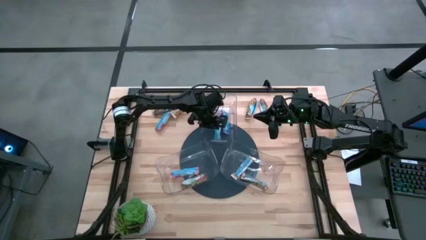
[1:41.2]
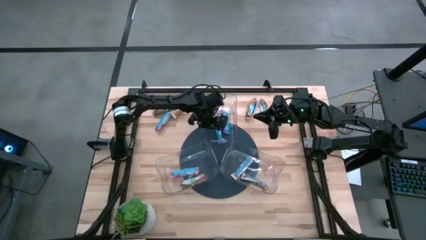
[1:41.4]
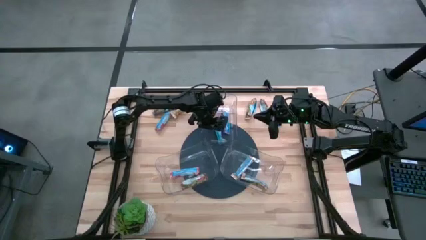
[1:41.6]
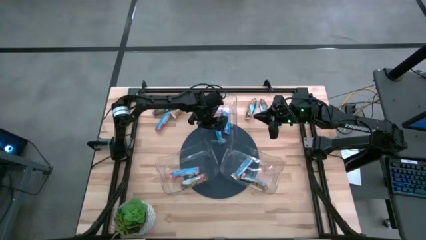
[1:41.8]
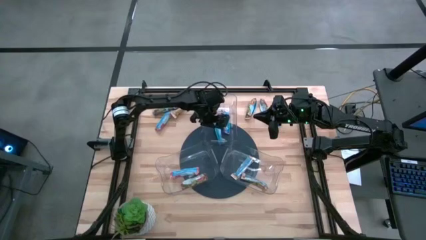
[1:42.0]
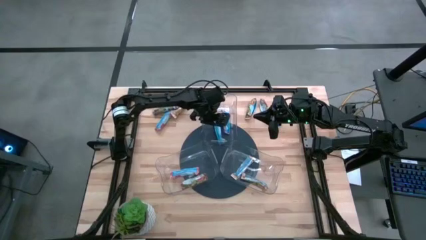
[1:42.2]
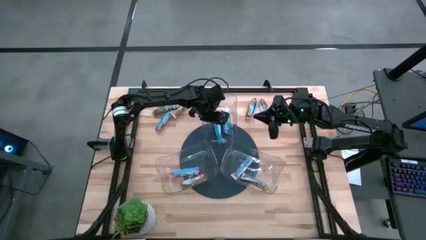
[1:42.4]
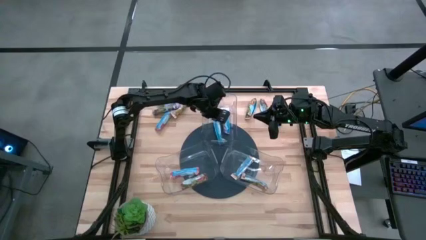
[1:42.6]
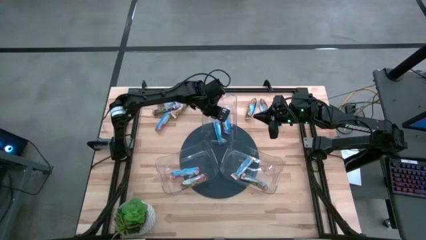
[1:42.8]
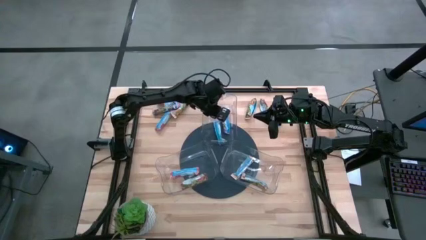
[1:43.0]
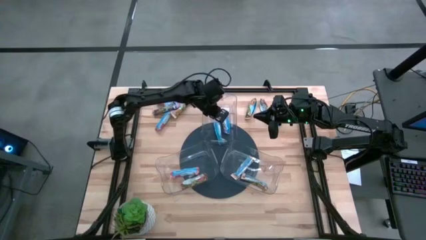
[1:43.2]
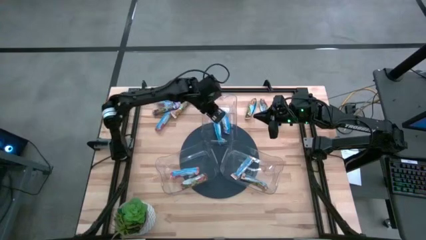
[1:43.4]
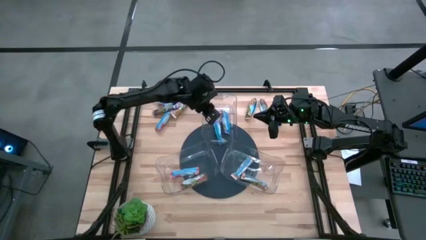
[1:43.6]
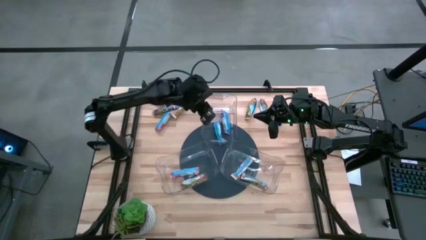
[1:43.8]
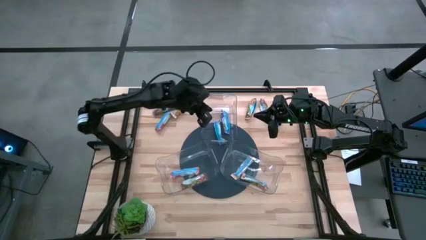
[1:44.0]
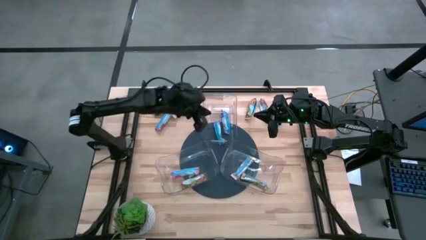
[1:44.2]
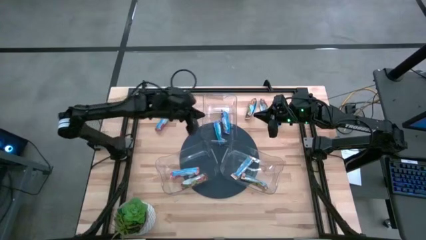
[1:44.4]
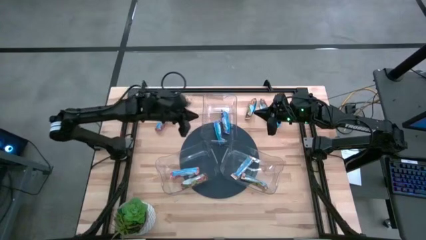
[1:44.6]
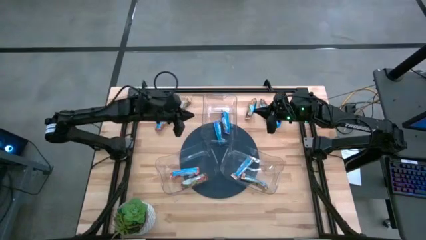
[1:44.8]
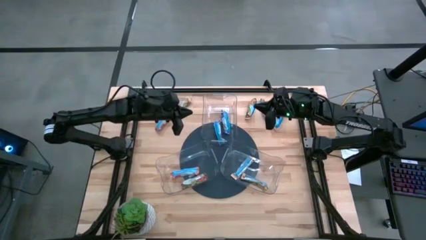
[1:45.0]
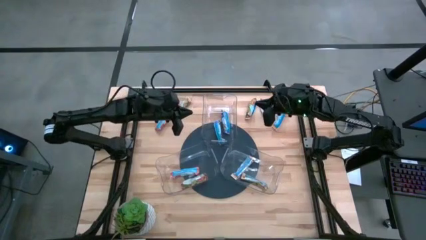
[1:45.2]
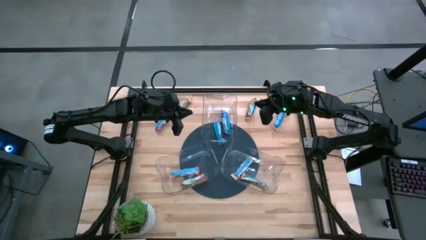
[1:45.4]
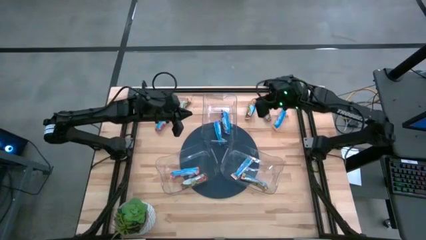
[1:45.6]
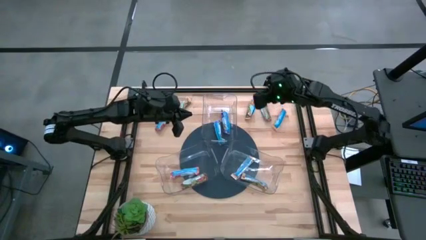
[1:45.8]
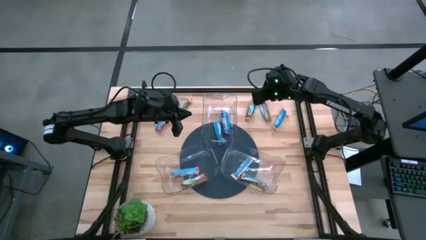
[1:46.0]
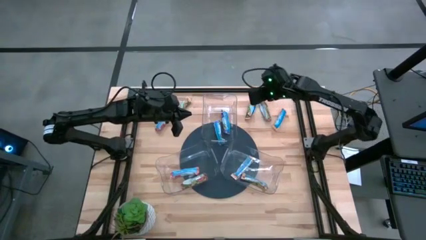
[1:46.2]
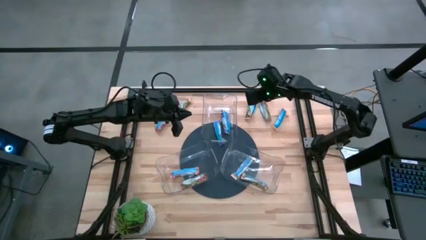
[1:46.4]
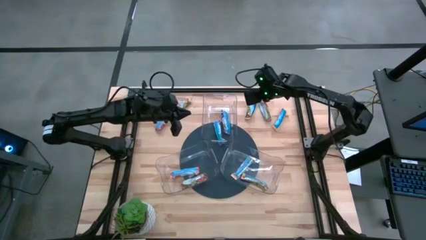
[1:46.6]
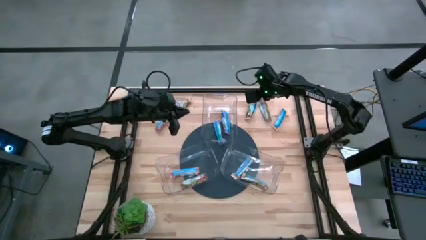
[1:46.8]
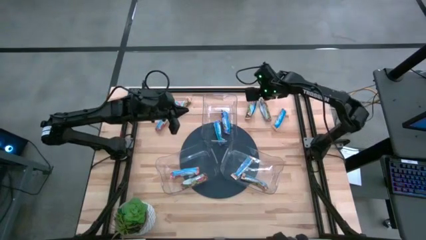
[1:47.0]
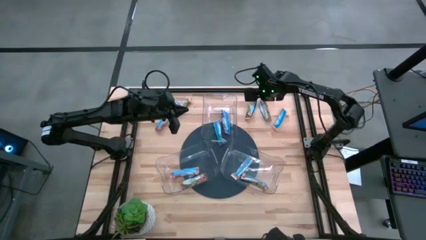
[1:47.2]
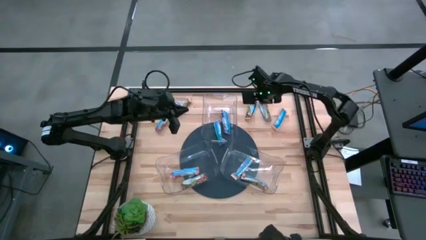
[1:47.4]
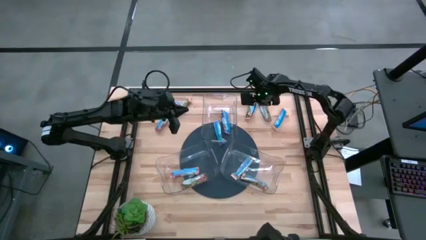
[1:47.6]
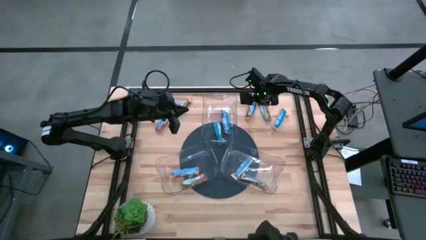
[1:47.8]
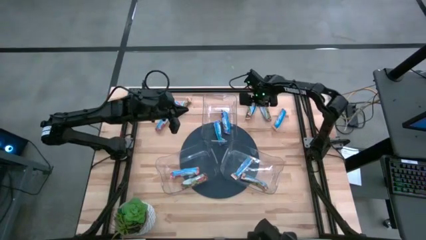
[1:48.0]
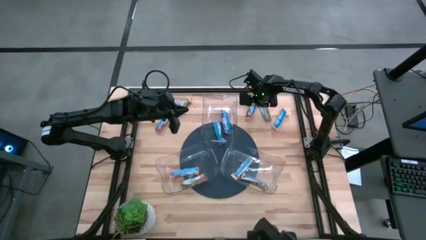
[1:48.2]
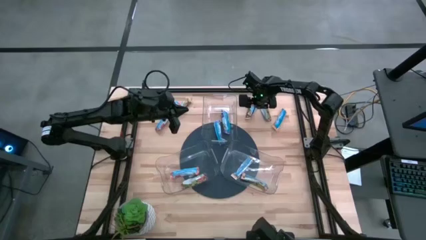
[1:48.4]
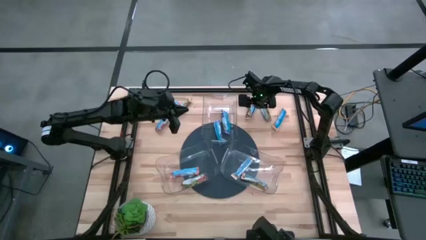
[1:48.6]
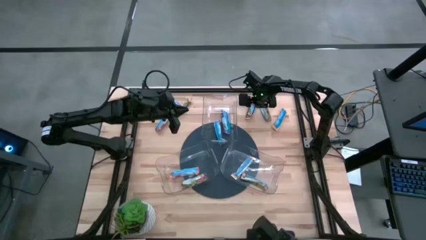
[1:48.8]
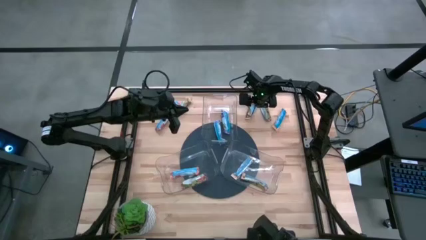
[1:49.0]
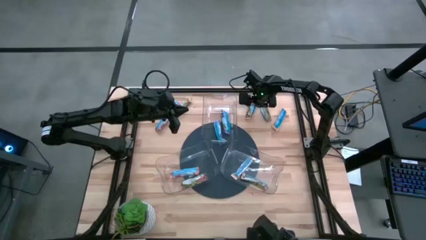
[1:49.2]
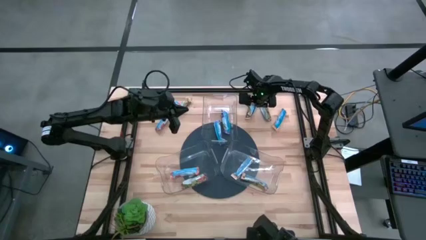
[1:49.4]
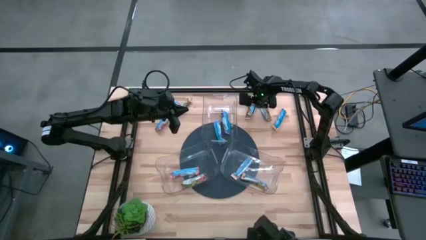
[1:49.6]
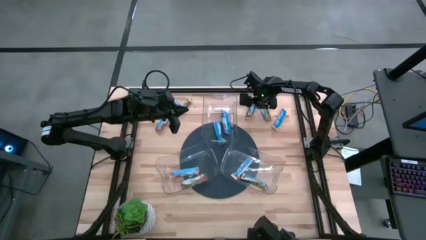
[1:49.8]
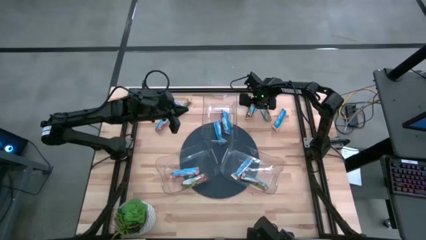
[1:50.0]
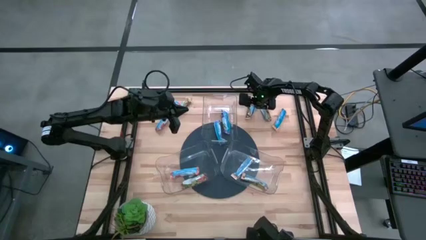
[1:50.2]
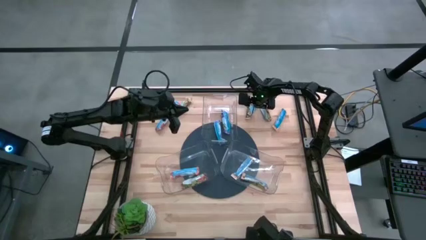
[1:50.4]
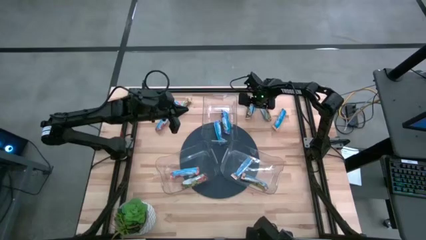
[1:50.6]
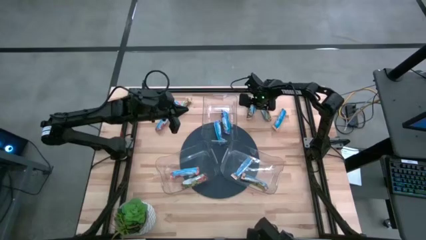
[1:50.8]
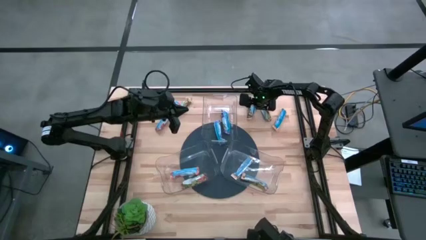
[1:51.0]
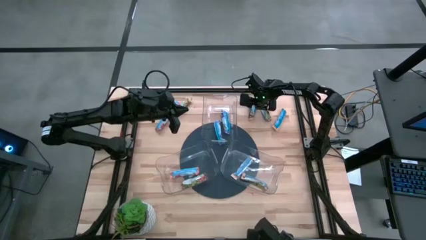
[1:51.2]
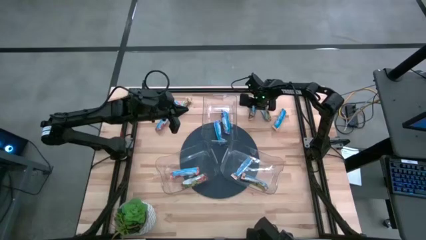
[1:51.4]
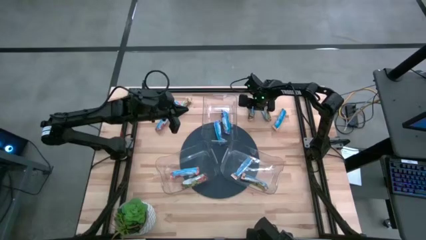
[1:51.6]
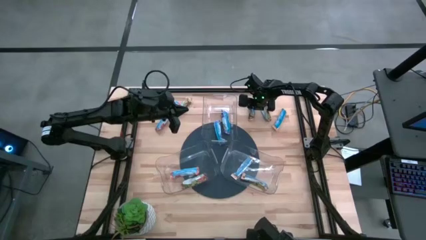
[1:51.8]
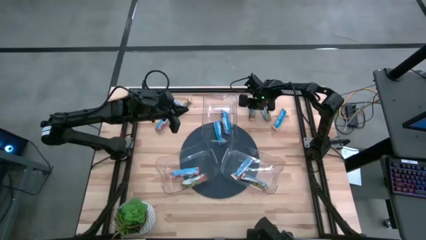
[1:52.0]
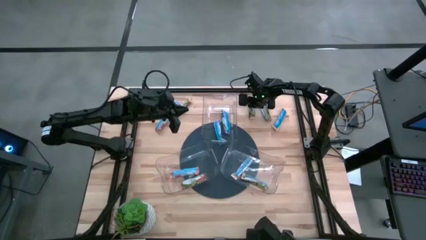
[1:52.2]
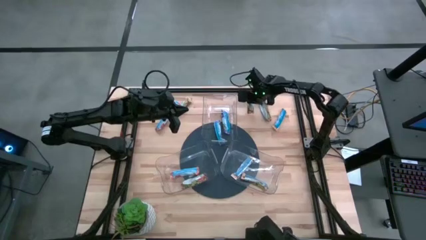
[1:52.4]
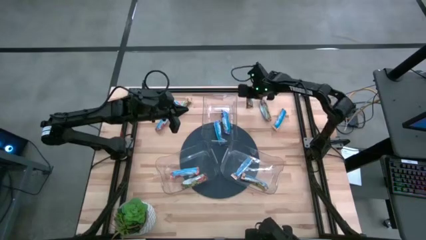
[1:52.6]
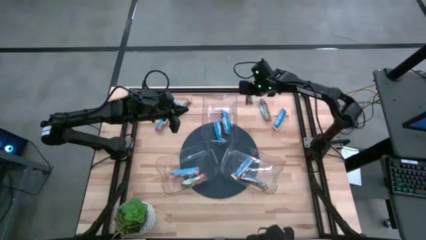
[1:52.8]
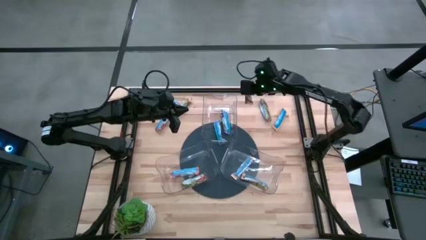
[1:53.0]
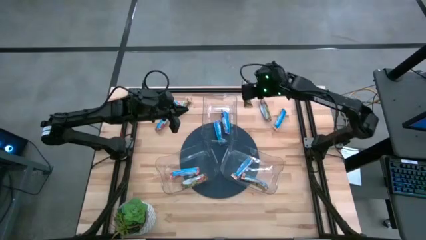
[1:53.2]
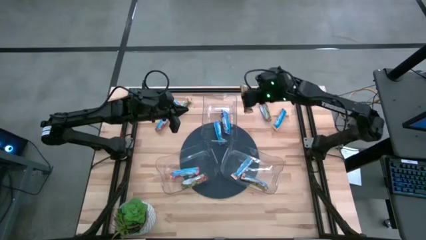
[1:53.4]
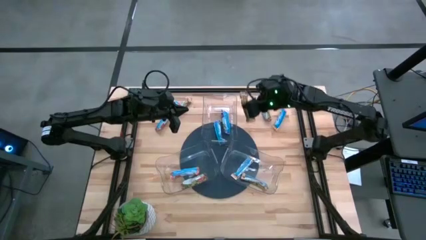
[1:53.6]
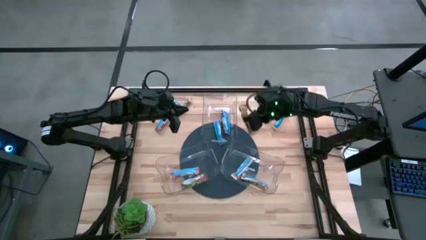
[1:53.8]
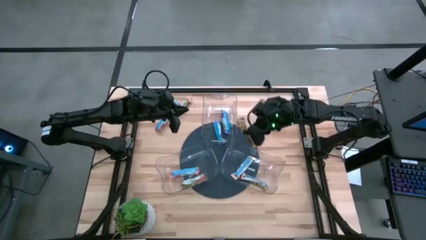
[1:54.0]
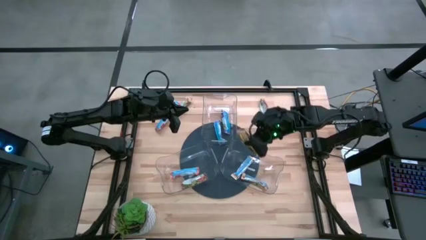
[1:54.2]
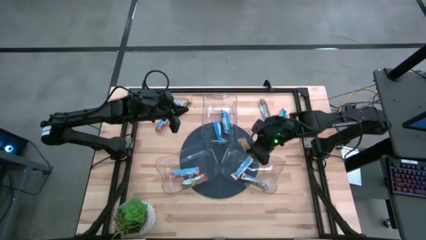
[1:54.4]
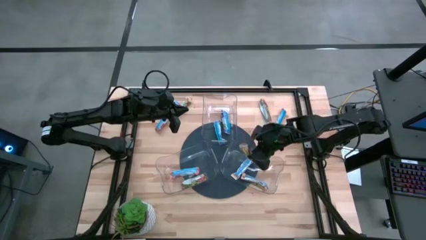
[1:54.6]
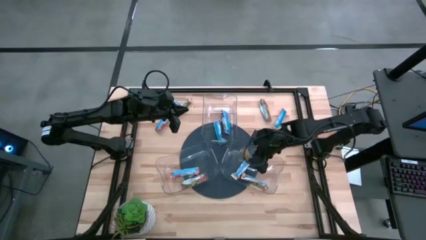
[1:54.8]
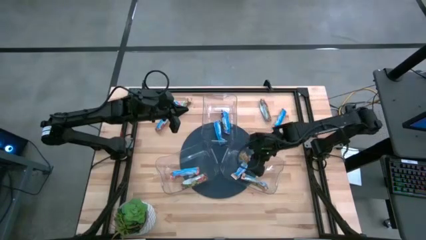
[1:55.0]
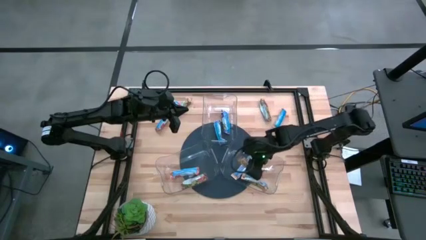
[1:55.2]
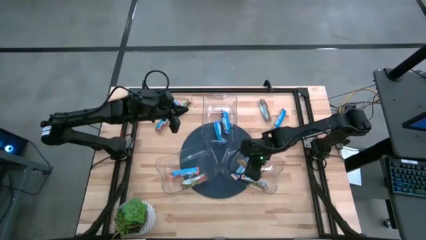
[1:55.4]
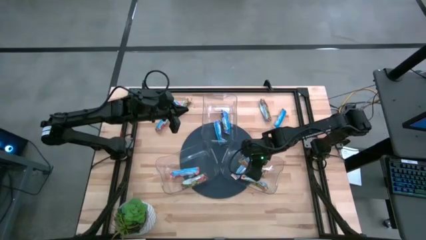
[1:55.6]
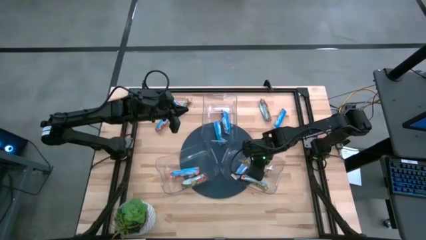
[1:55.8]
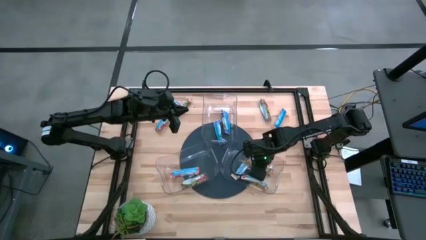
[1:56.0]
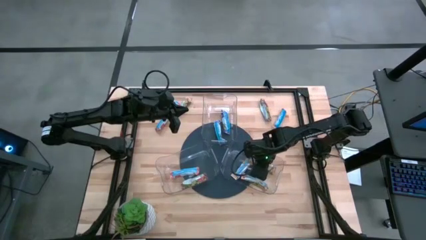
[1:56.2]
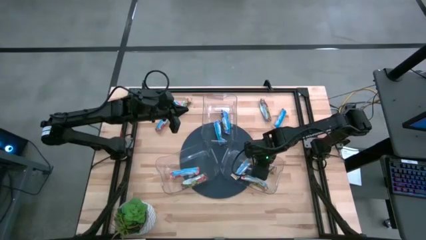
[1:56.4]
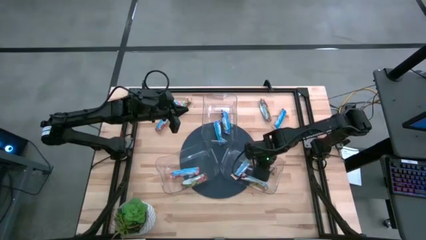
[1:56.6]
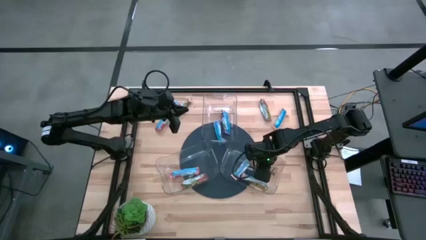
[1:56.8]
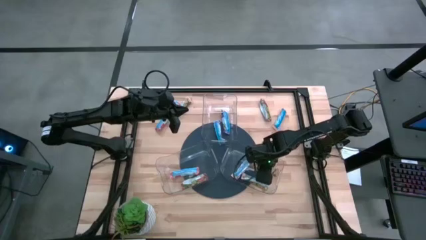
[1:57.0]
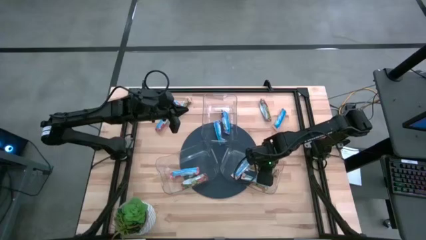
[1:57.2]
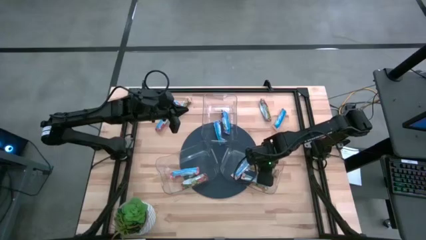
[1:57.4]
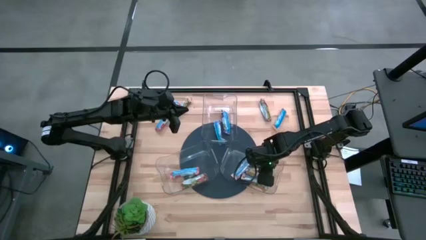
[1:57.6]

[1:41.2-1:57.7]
Task: Pick and place Granola Bars by type
Put the yellow granola bar into the right transparent bin

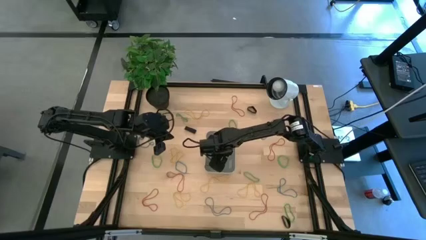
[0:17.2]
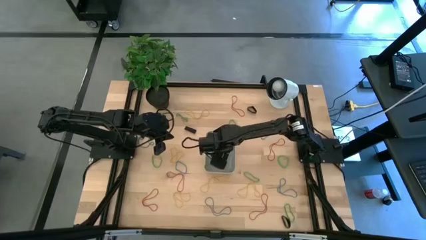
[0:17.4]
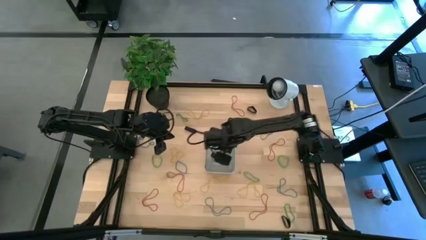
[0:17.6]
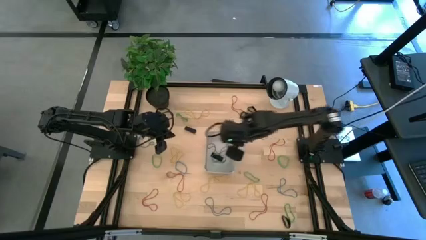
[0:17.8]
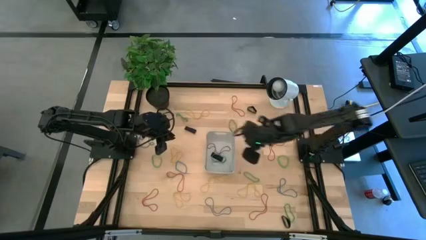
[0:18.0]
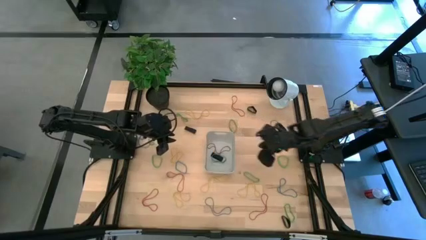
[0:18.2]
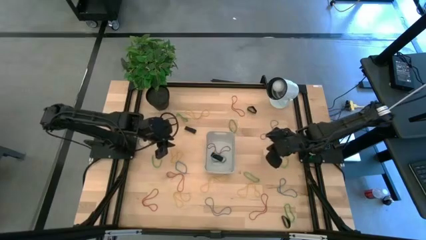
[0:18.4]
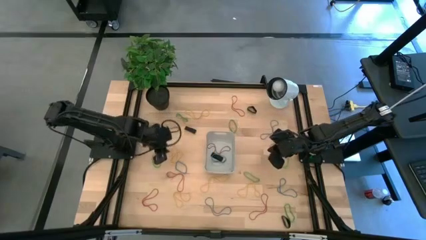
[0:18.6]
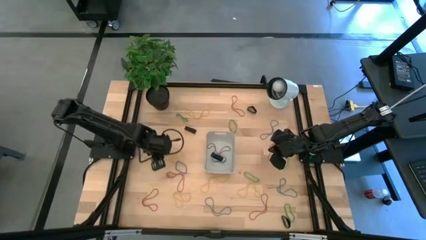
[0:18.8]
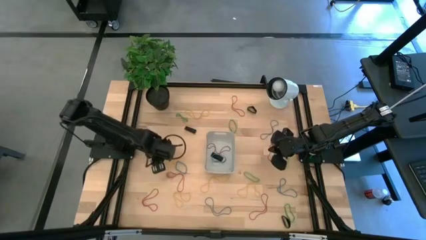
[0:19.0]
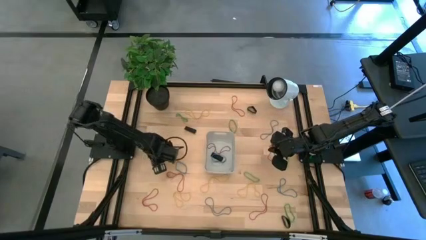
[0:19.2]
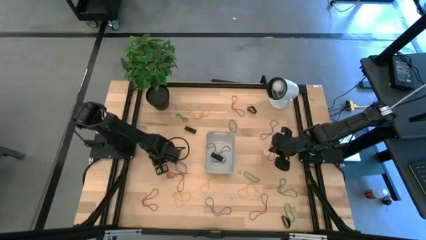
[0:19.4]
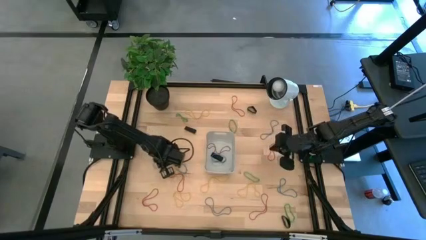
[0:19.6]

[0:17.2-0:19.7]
Task: Pick and place rubber bands into bin
Put the green rubber band into the gray bin
